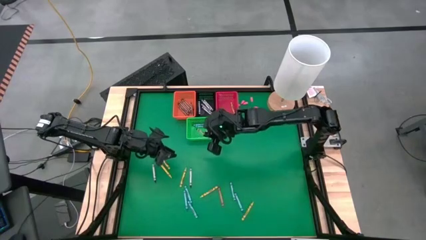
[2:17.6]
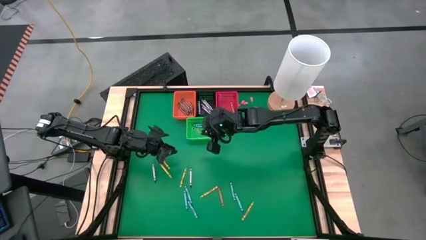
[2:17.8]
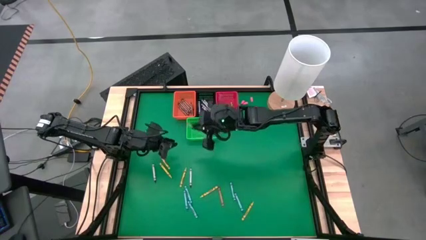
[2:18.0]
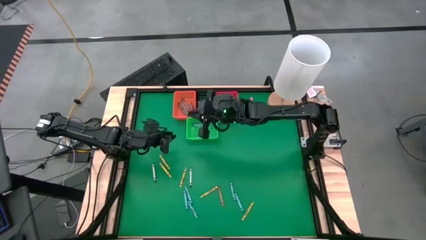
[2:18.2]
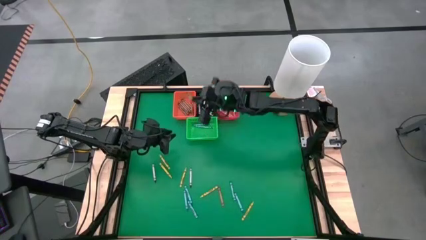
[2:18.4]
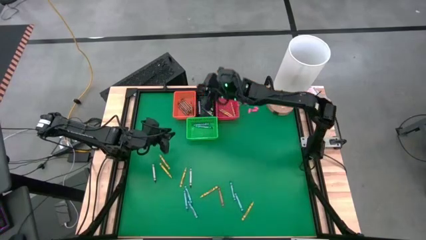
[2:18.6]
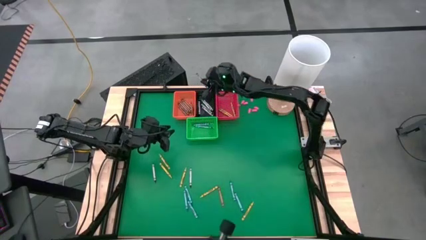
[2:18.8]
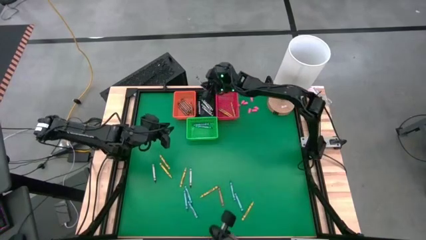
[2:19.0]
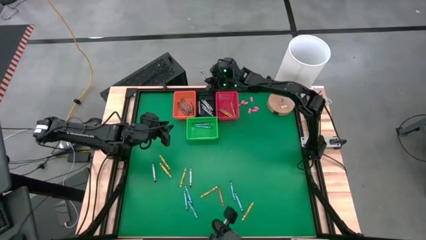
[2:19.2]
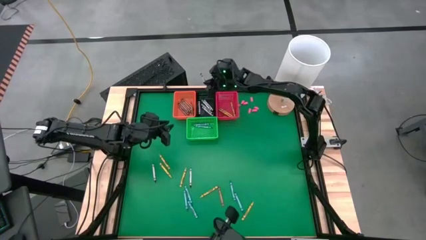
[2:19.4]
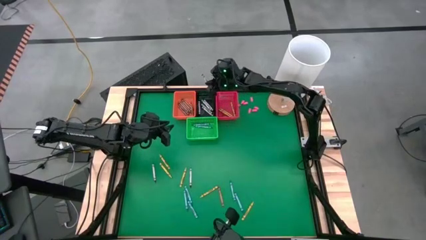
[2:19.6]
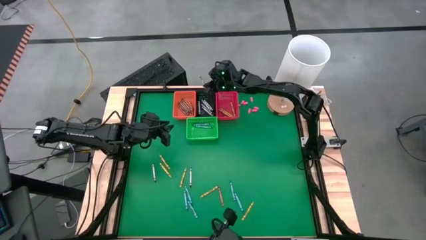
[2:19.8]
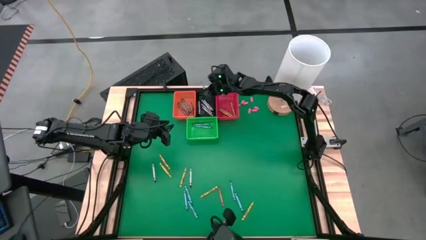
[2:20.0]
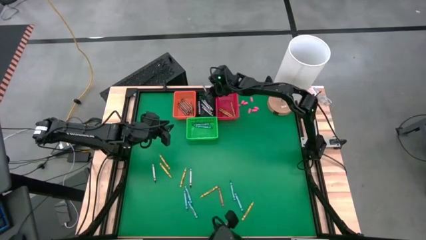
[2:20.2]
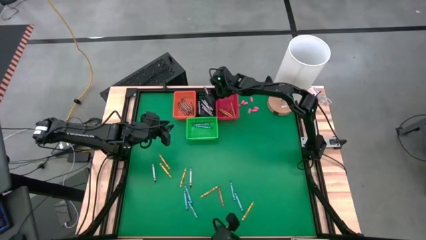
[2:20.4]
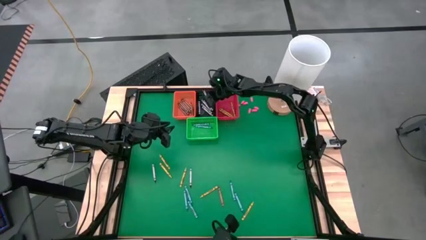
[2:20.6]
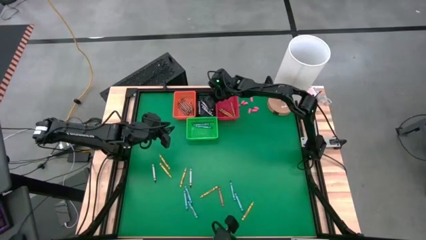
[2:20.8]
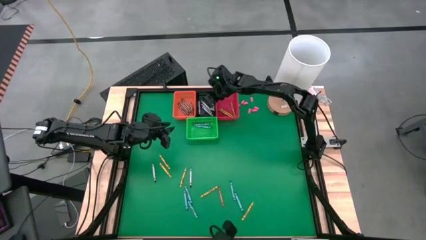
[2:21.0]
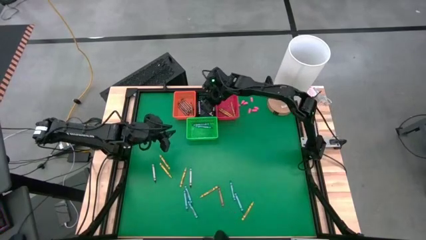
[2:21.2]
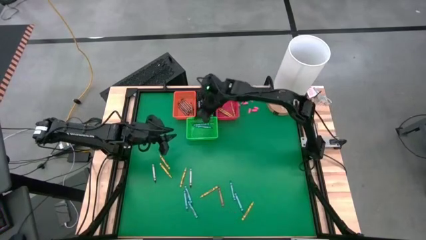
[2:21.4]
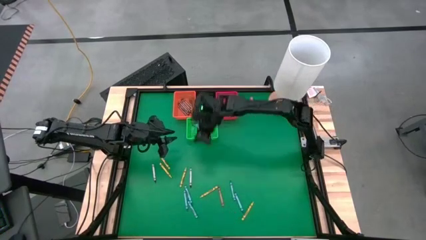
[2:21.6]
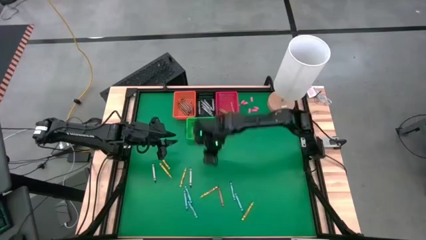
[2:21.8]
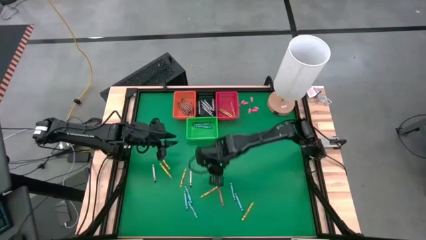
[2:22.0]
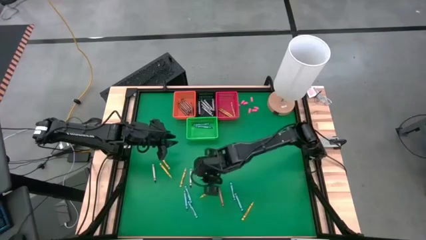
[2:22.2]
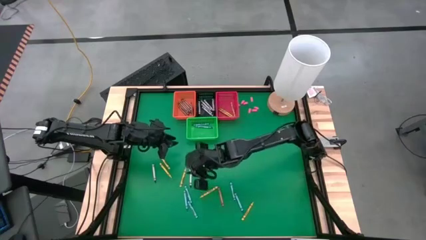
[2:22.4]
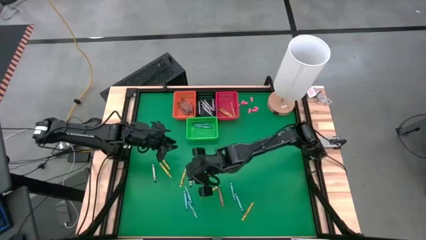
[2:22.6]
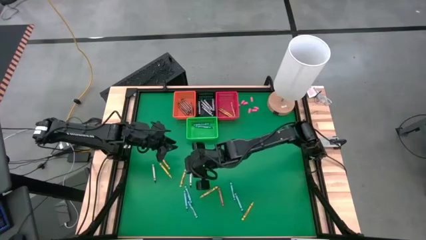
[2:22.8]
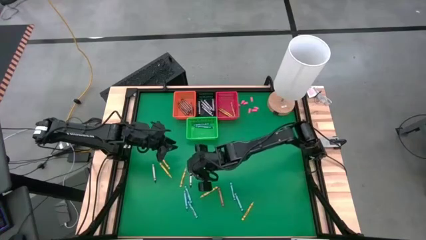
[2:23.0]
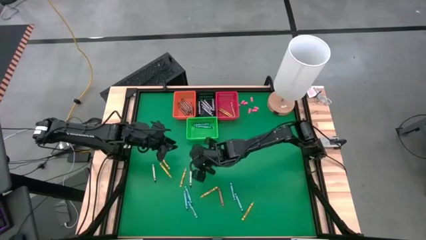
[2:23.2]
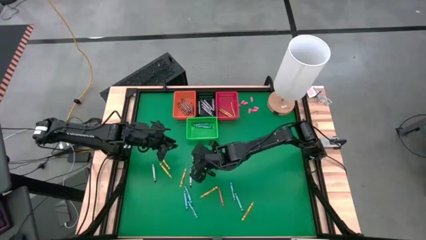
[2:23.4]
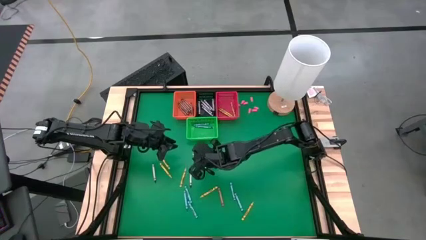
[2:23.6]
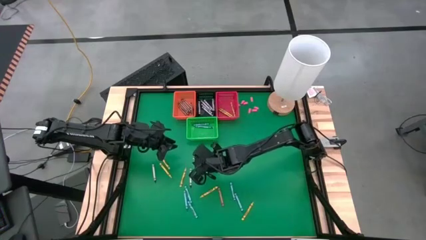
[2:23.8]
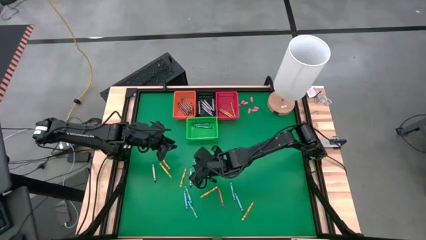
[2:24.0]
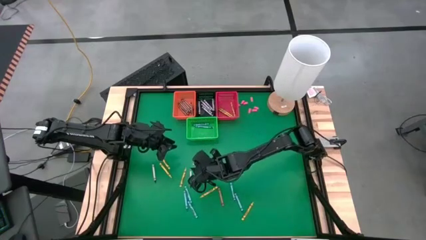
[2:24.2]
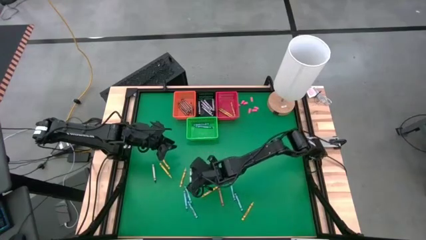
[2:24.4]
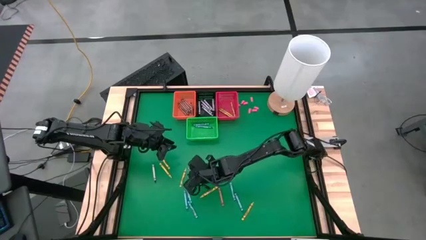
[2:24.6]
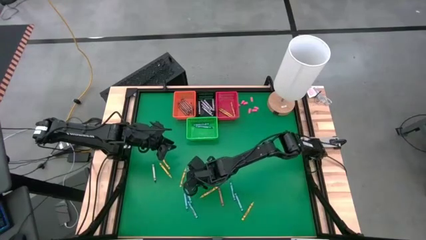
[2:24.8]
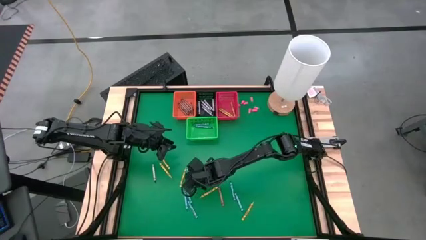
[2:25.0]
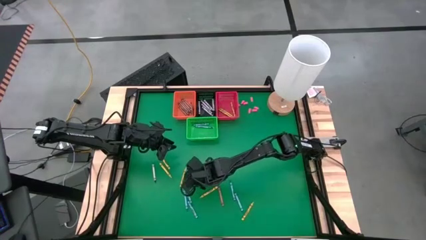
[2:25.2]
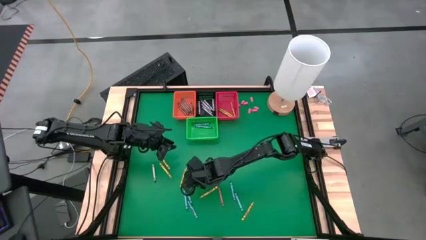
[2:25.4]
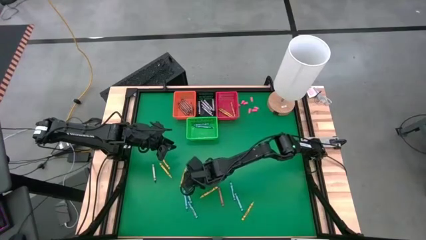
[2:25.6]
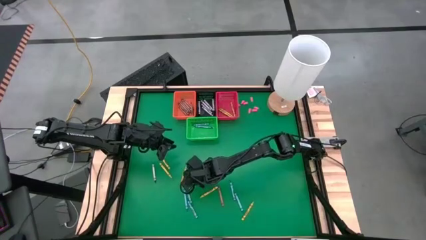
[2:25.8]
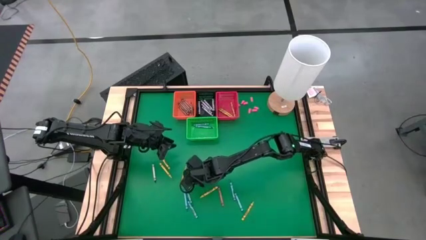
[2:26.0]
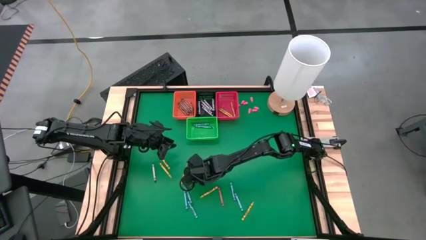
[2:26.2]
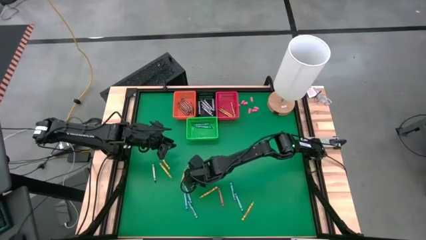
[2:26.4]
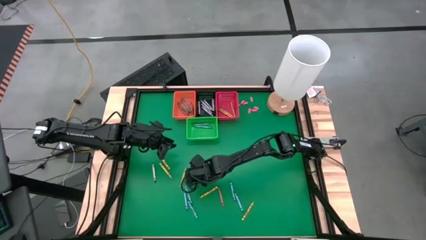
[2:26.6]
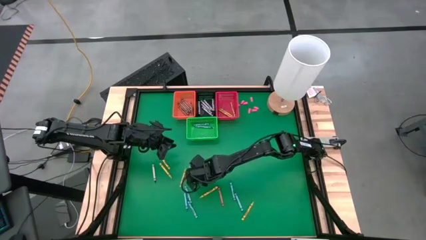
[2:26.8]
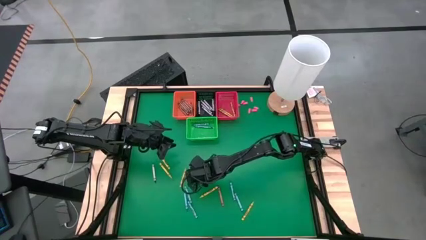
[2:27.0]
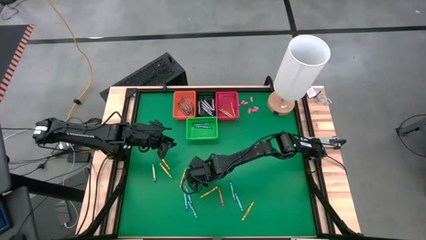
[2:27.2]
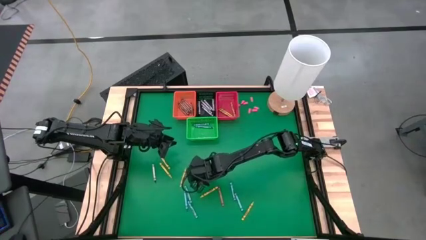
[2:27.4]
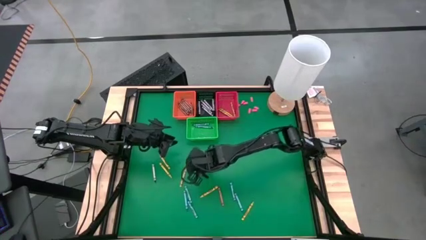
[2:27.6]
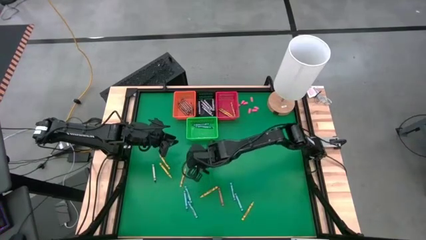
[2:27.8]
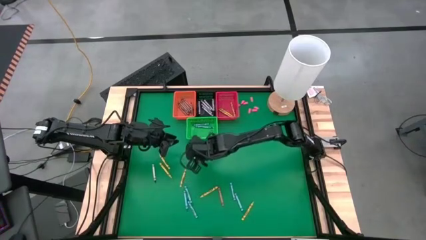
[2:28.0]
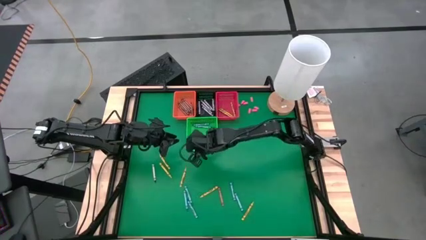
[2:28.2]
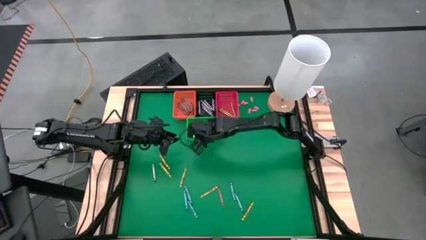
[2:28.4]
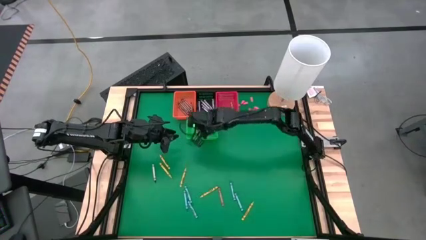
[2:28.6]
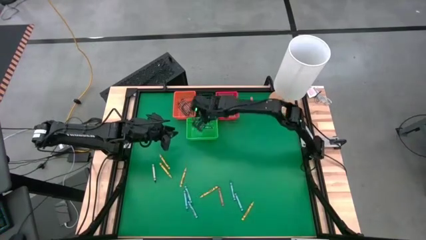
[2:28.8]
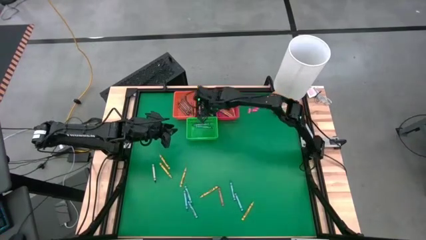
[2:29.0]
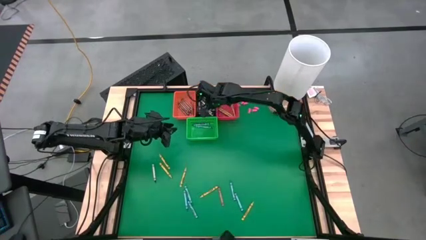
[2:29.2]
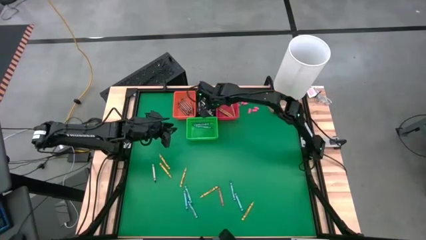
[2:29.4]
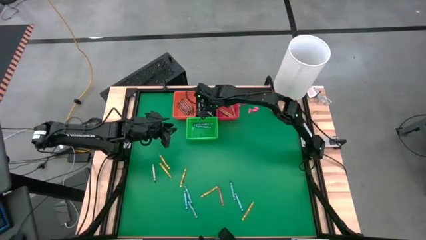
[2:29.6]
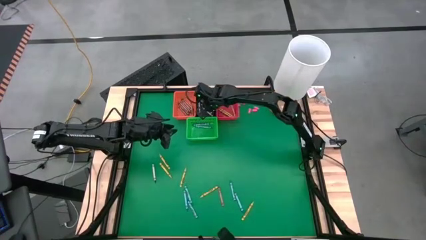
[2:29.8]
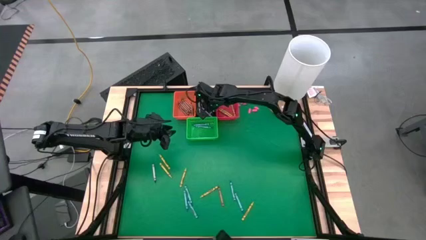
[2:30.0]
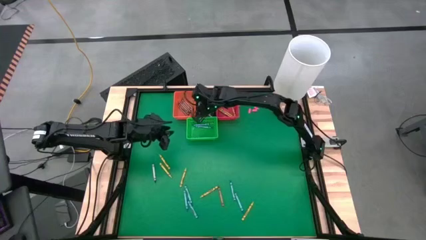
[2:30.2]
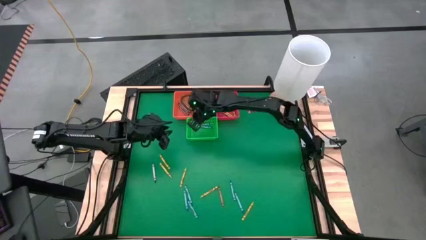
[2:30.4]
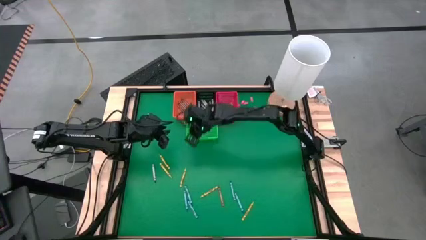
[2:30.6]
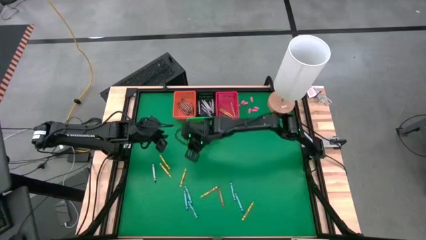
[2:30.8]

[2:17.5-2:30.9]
Task: Sort crayons
Put a black crayon in the black basket
